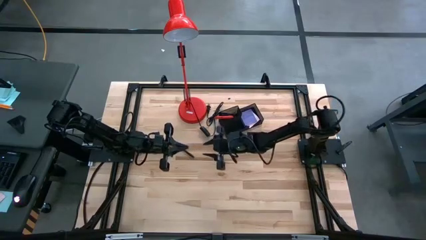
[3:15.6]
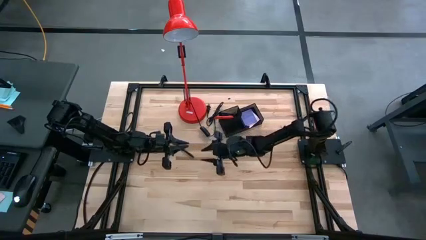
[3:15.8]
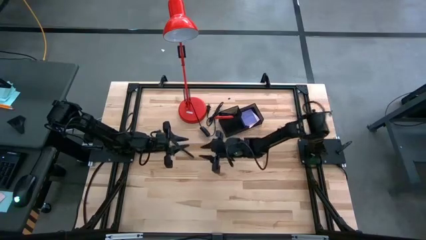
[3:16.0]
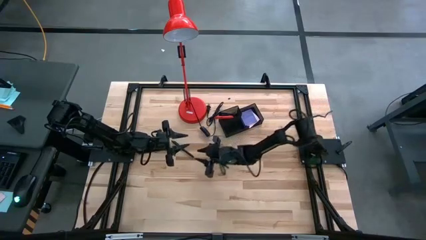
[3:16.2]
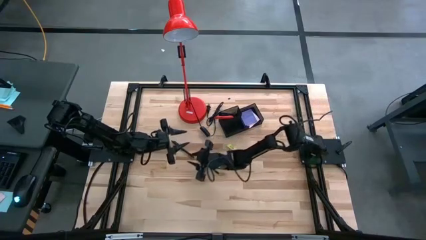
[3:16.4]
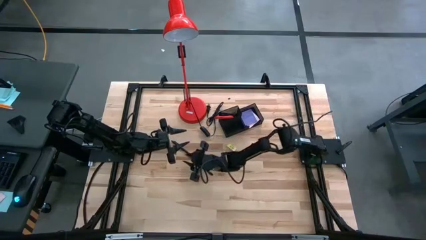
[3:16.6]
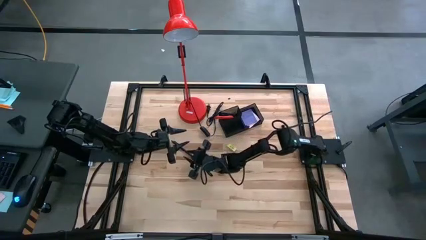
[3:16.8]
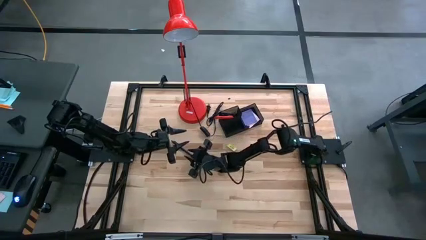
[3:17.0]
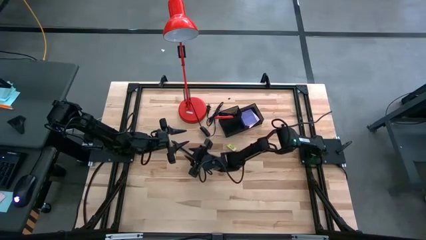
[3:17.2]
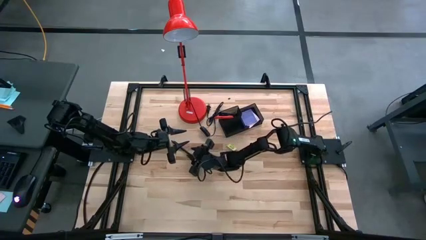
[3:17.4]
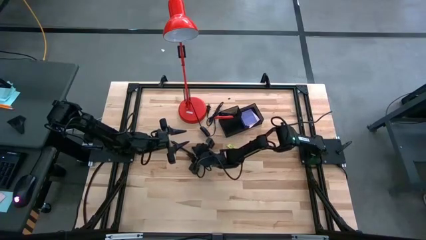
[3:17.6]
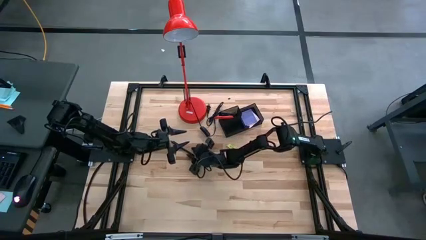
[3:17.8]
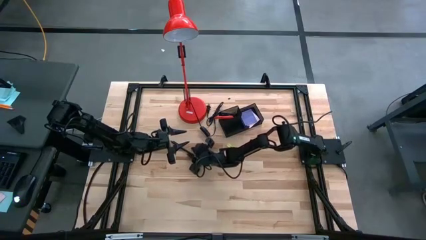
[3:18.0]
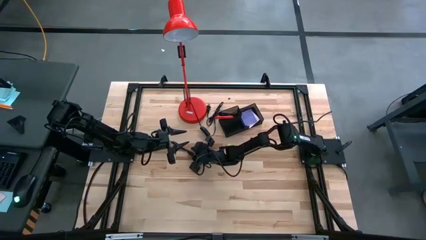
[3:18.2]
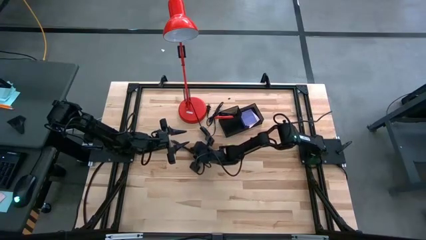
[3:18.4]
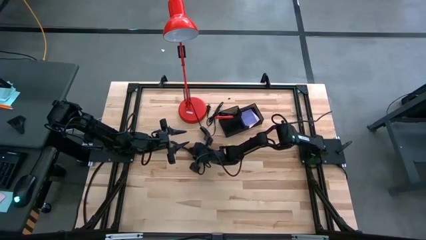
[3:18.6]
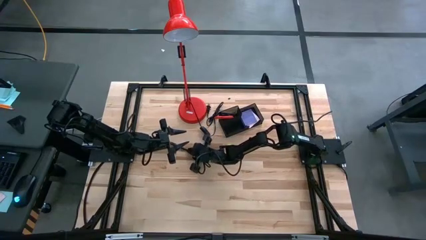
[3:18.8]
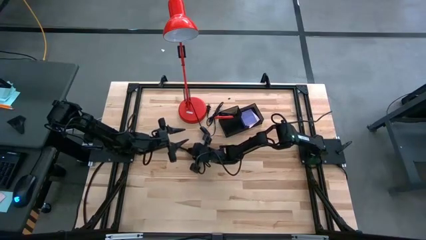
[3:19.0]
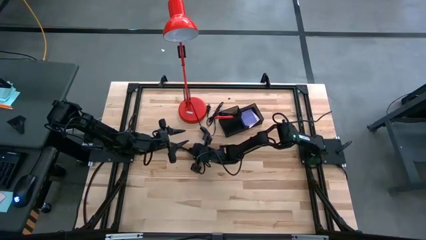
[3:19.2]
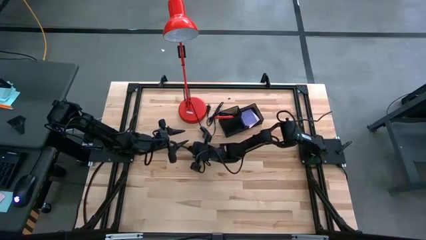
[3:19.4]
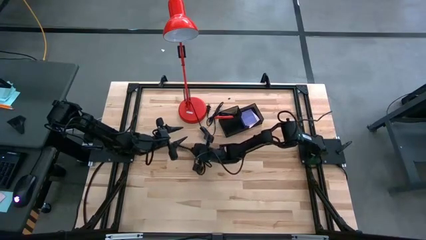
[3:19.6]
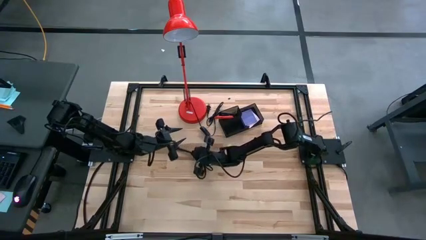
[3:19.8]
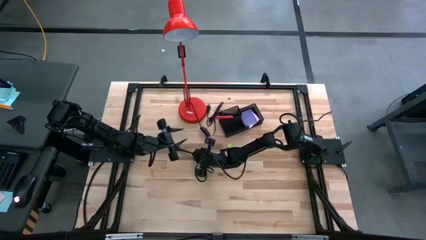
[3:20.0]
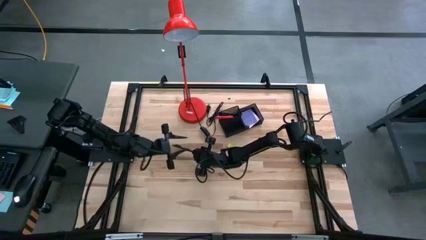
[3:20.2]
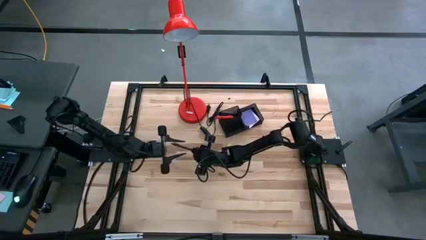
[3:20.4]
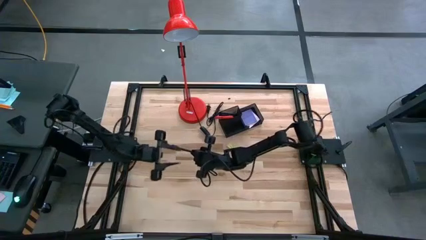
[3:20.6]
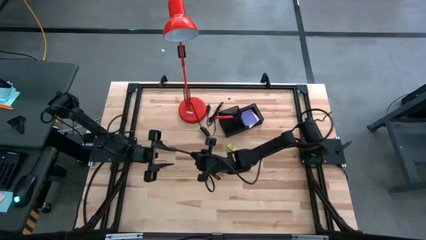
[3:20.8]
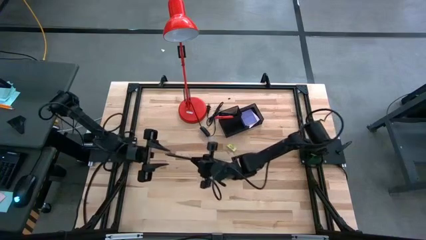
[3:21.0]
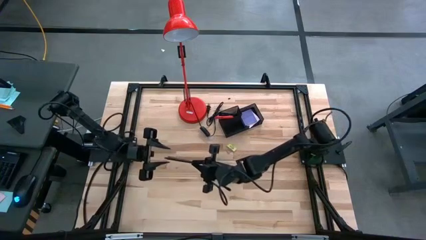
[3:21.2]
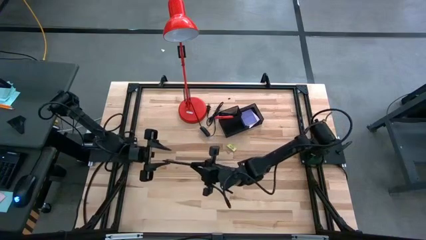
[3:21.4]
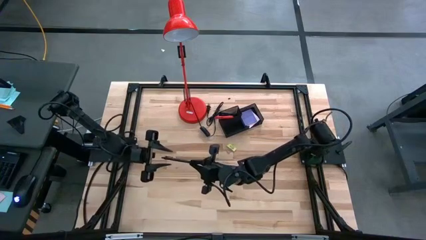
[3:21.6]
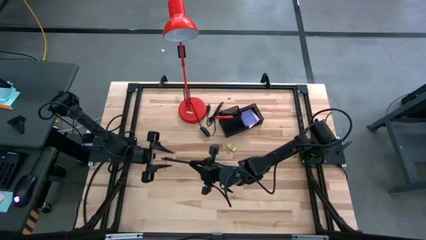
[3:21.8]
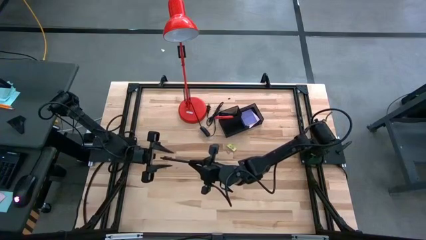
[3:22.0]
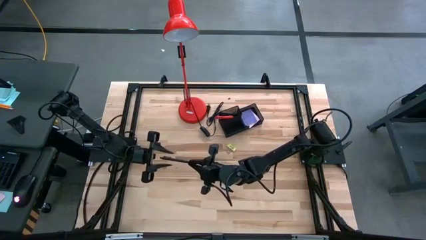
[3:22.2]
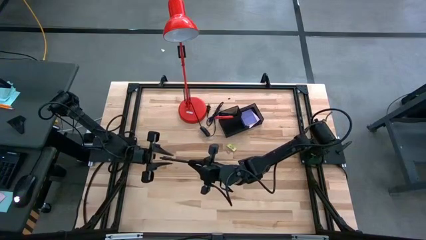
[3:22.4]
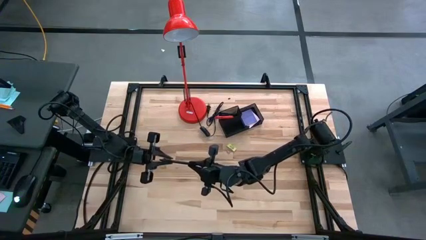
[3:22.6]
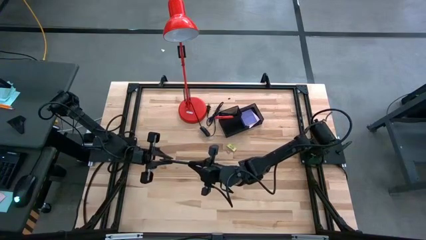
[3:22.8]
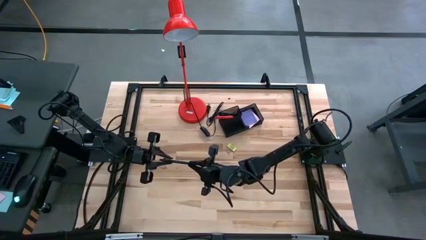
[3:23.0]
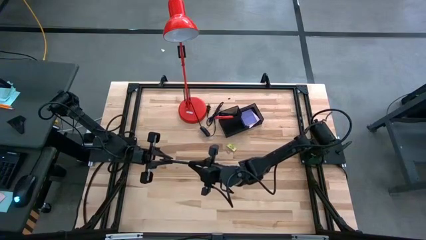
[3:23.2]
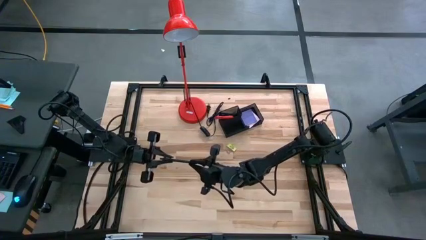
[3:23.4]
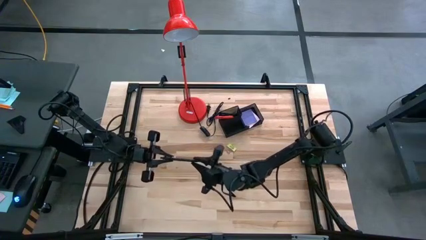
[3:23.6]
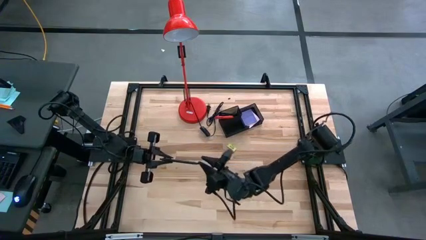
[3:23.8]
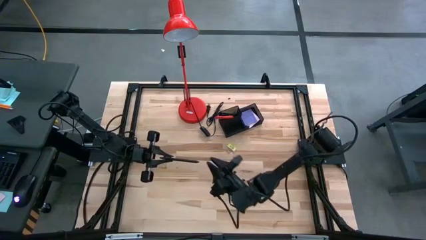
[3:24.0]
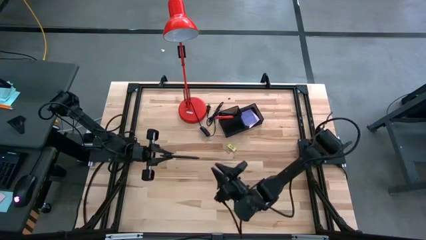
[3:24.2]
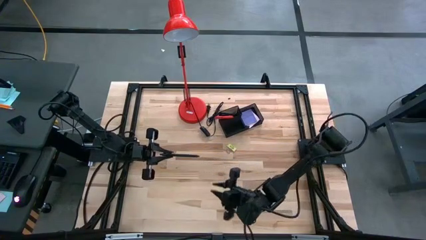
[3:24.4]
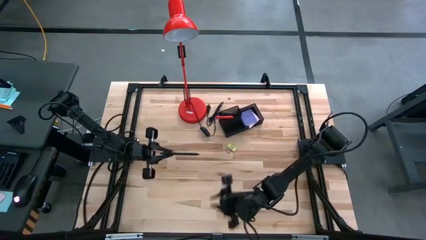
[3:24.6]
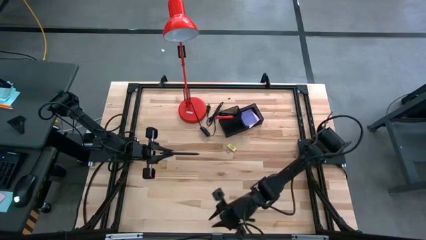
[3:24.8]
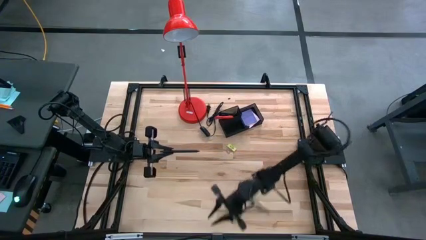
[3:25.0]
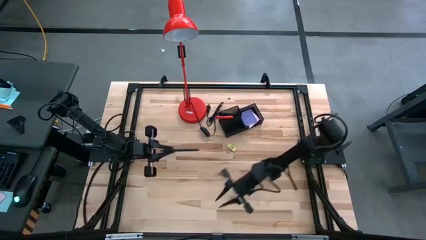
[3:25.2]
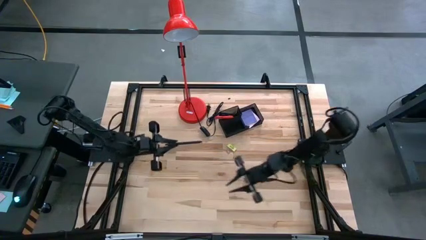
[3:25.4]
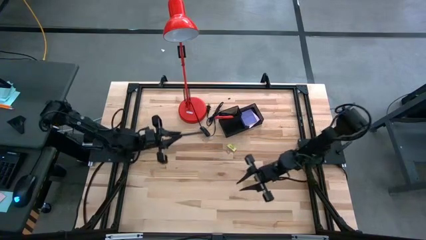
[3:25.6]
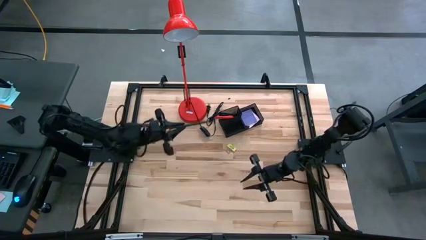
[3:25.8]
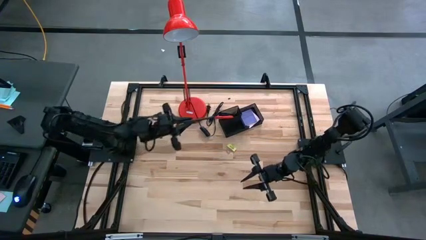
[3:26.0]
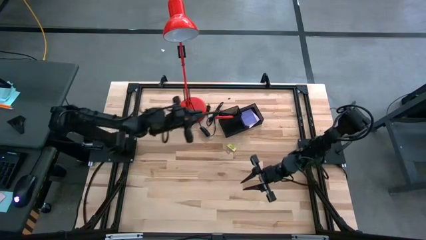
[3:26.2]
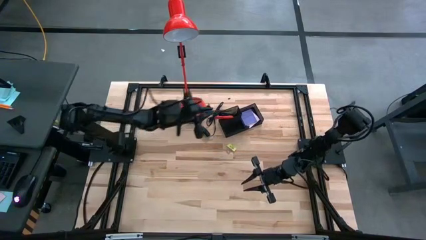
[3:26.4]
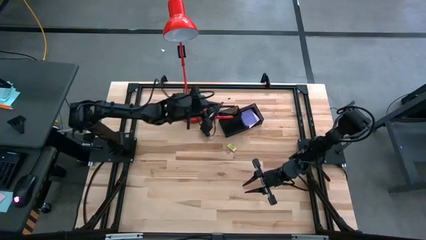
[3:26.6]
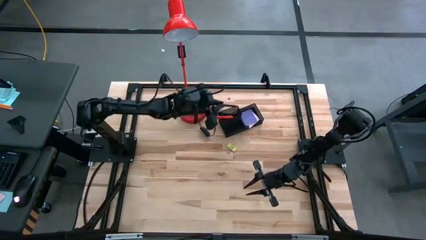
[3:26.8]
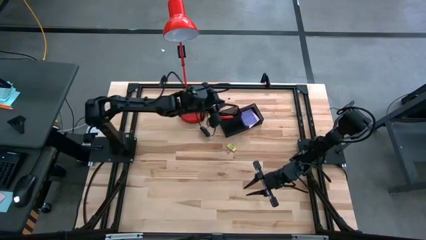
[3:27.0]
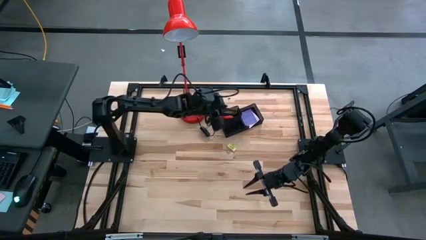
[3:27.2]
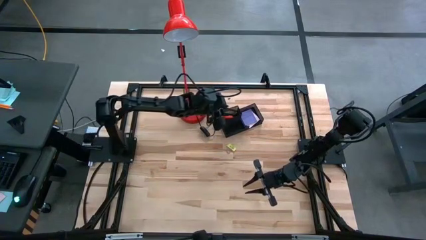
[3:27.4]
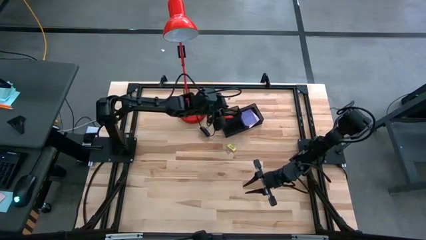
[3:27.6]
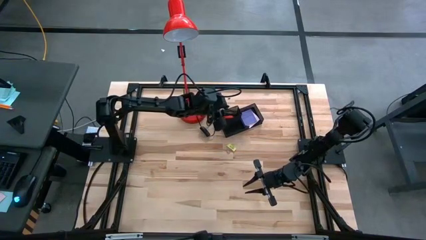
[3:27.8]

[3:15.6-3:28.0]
Task: Pick and place office supplies into organizer
Put the black pen into the black desk organizer
